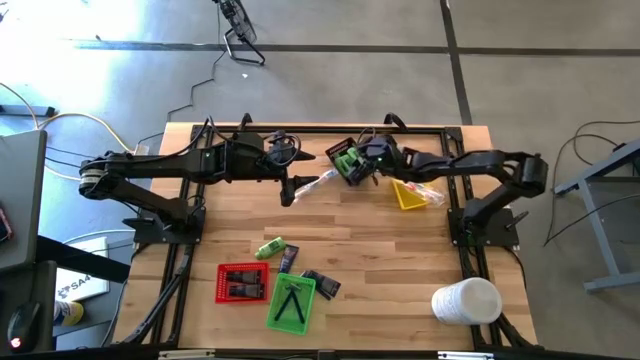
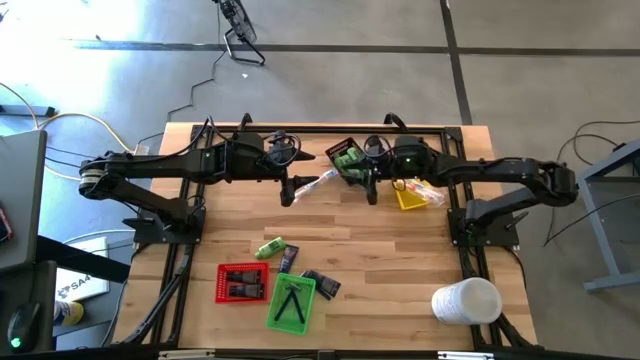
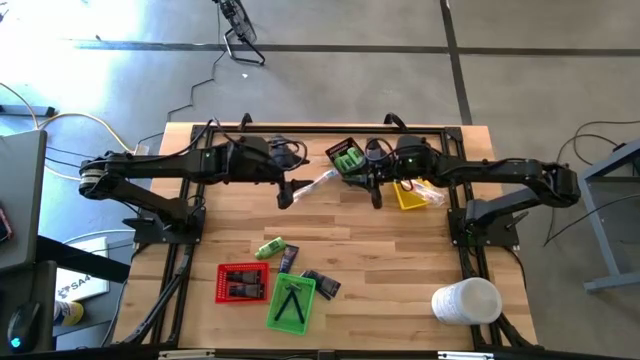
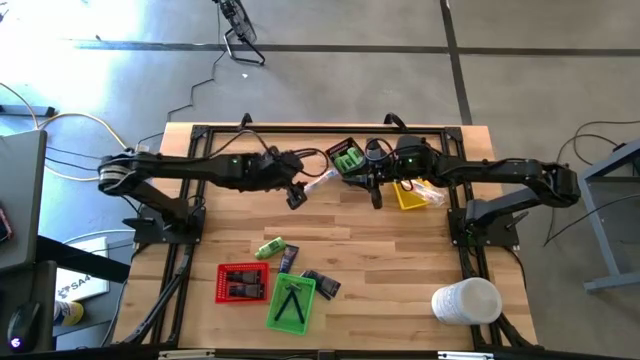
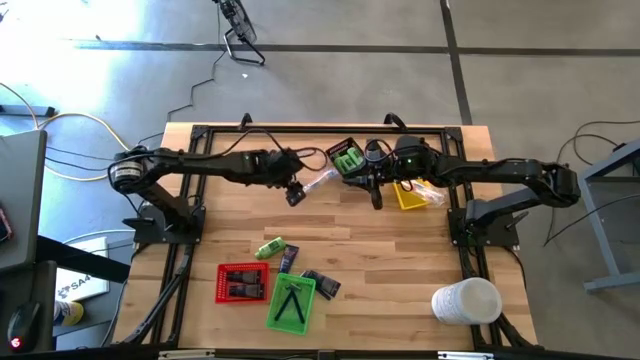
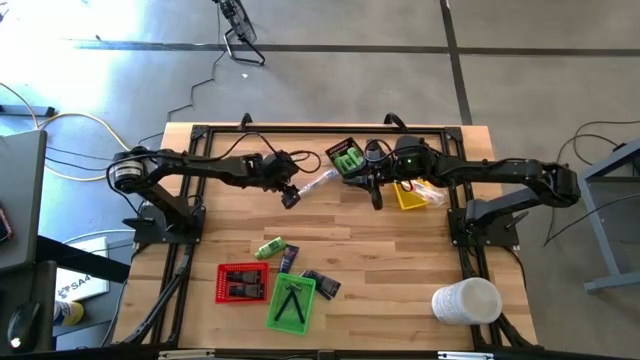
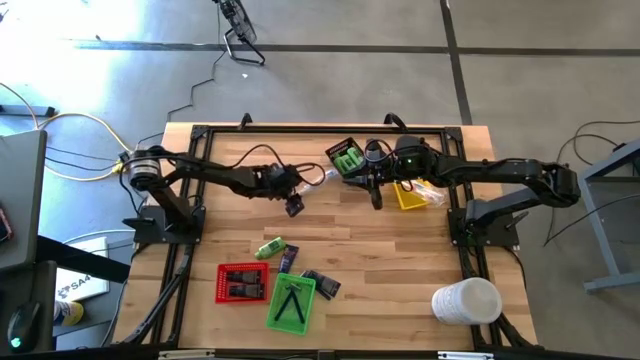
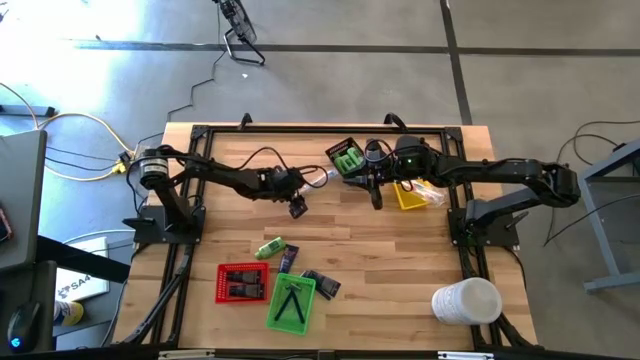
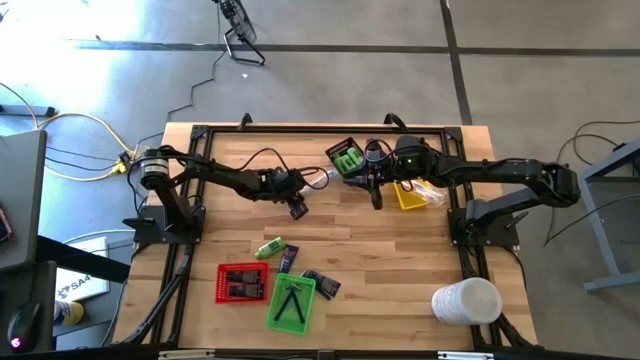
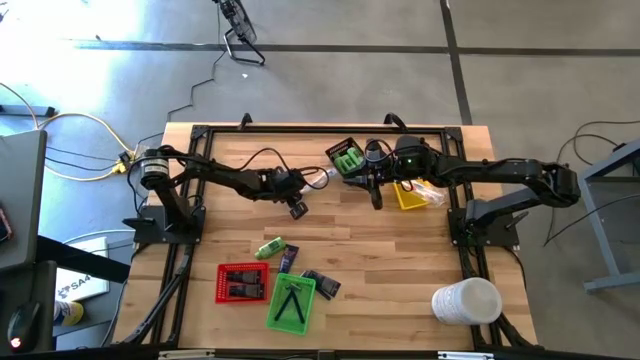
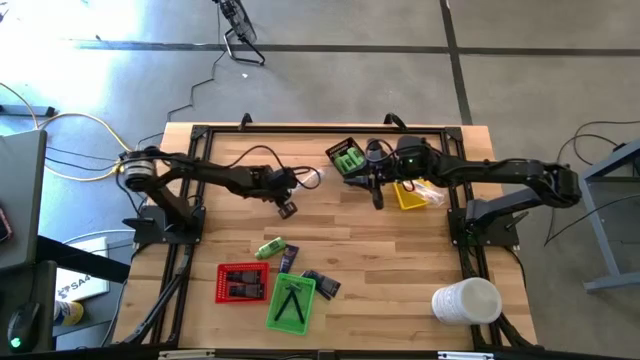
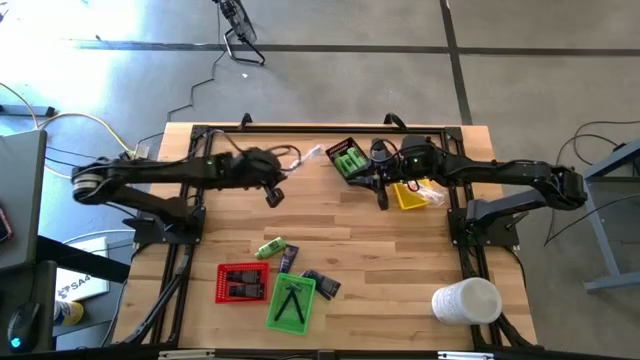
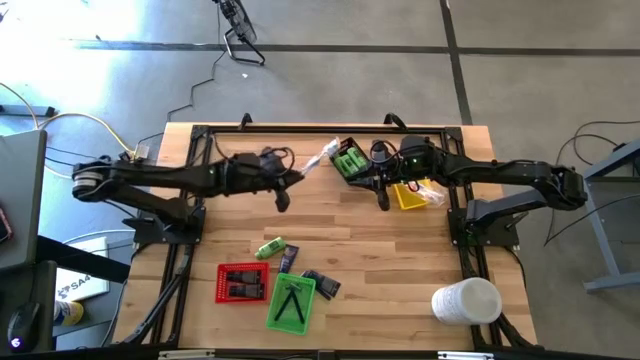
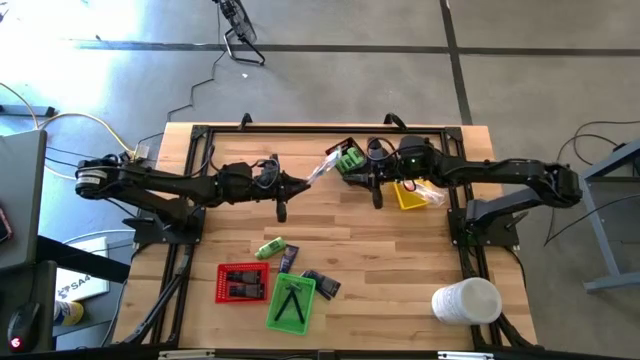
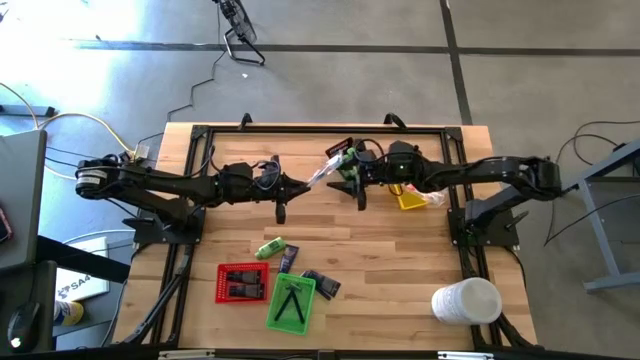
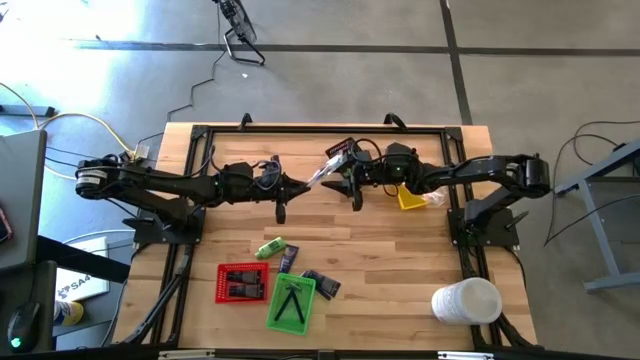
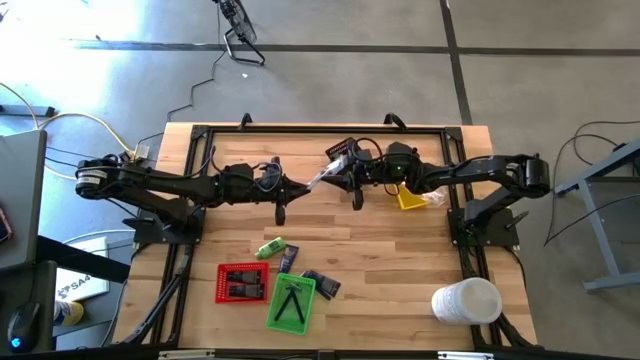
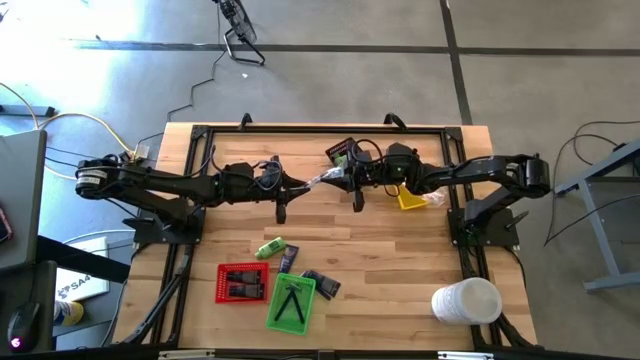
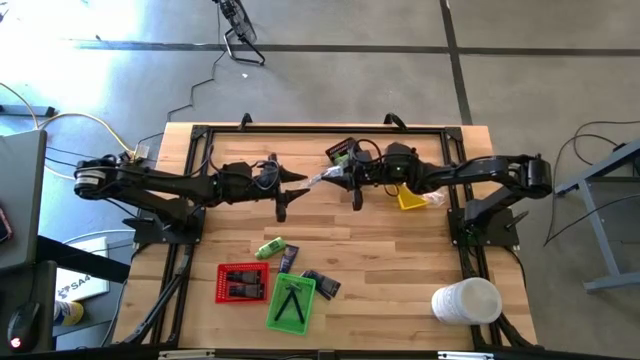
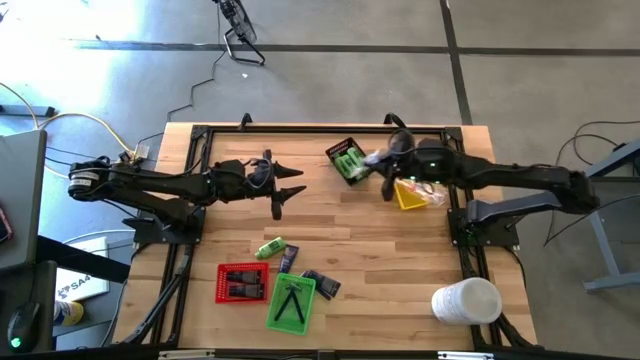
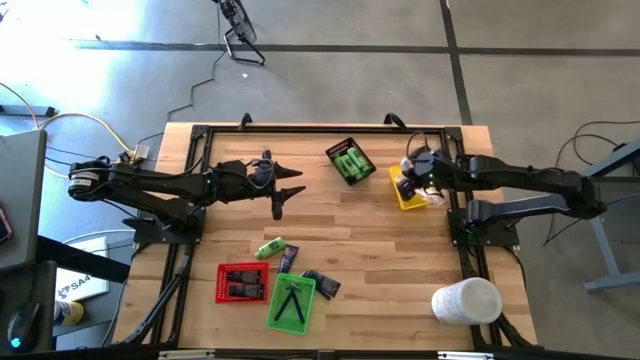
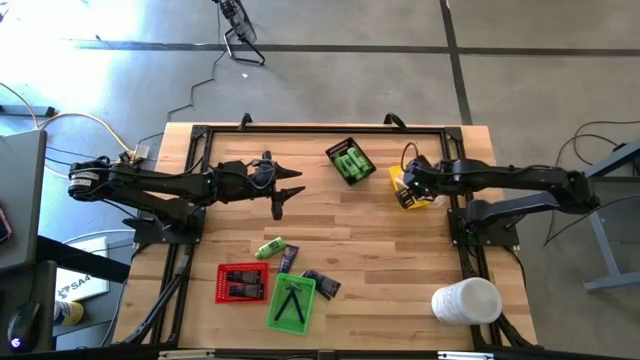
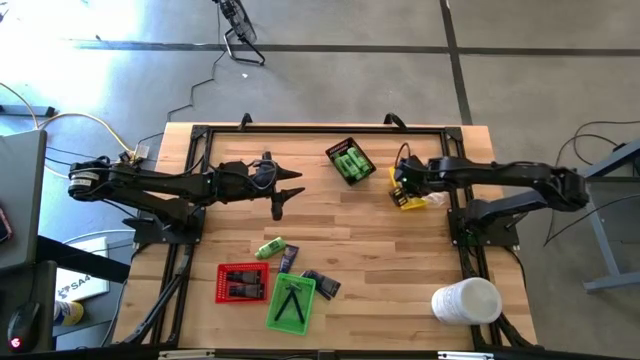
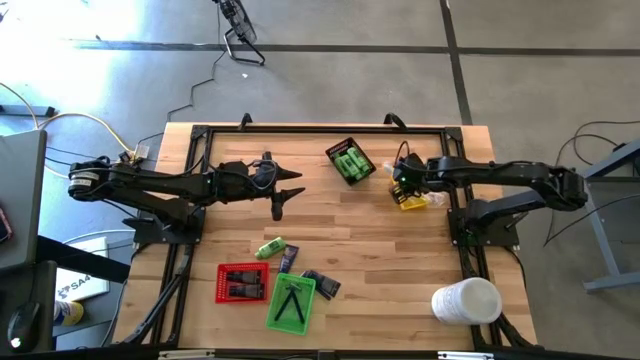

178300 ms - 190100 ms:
Task: Pick & Place Travel size toiletries
Put the blue toothbrush into the yellow bin

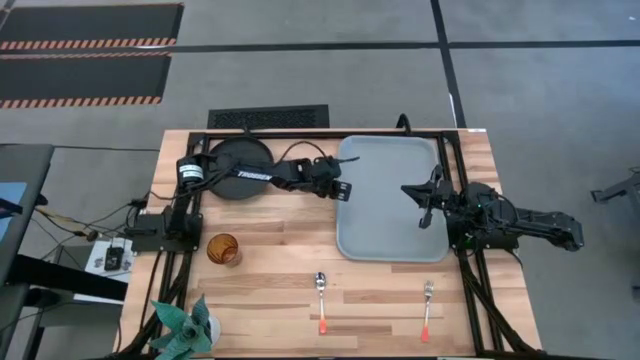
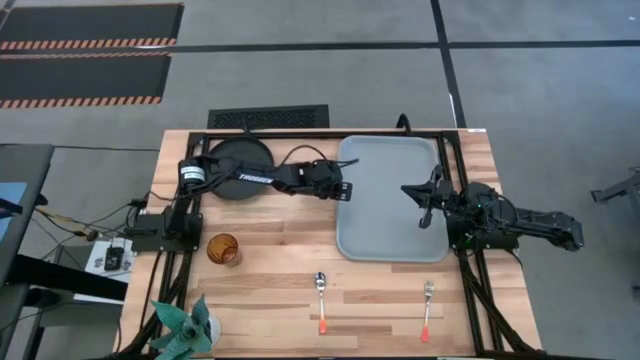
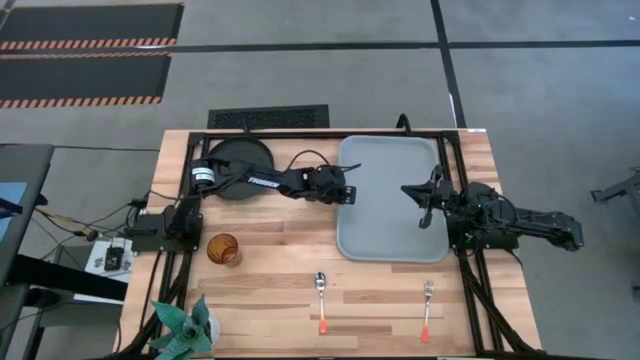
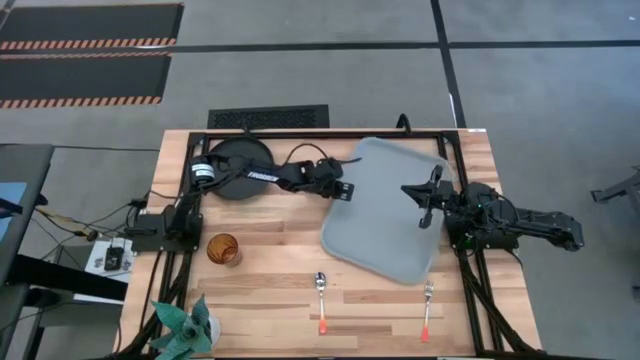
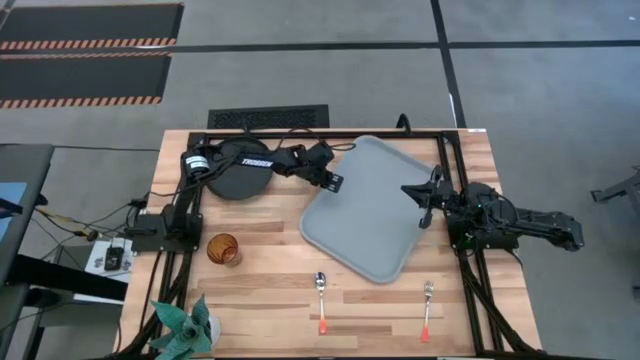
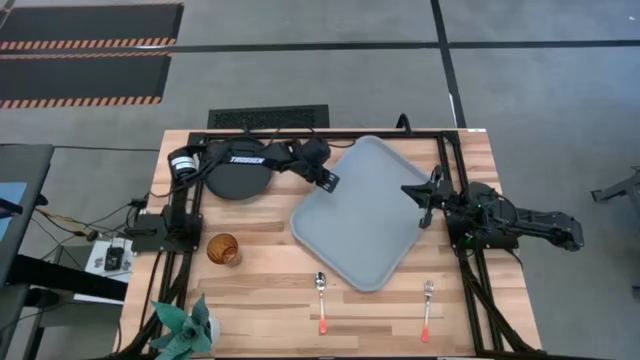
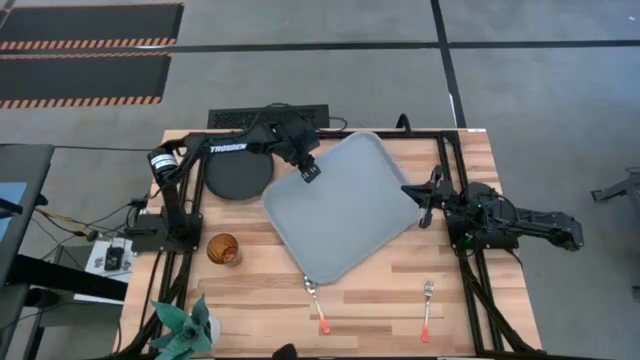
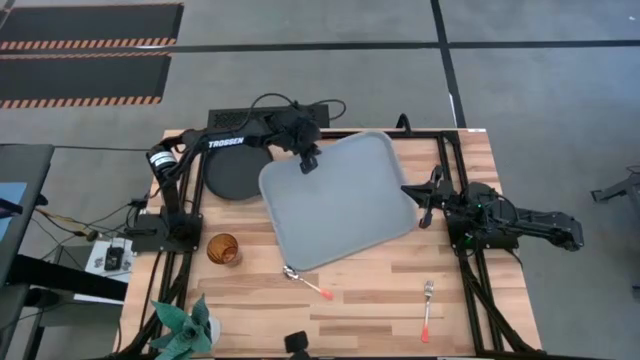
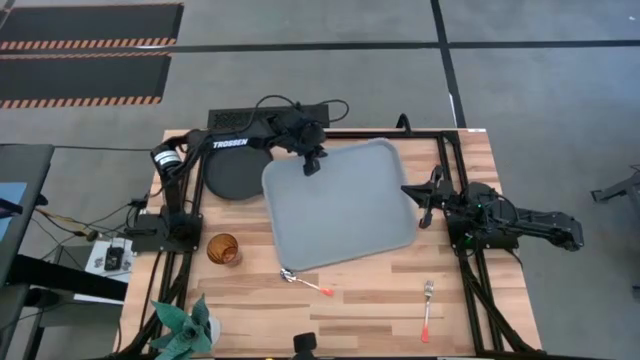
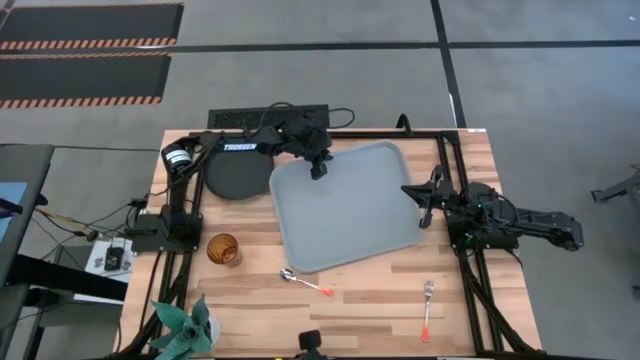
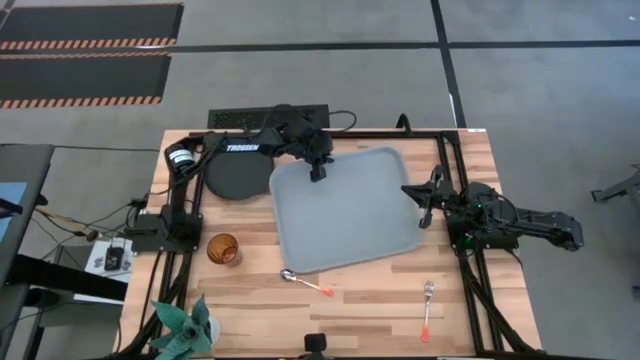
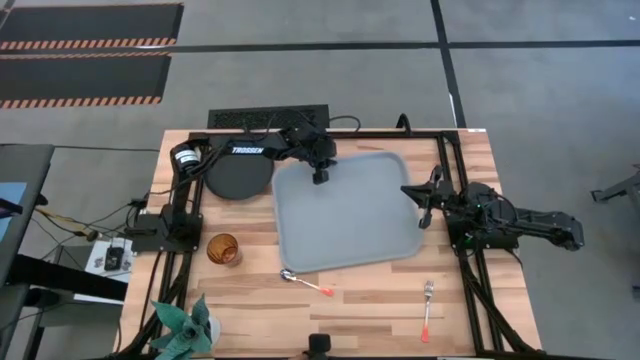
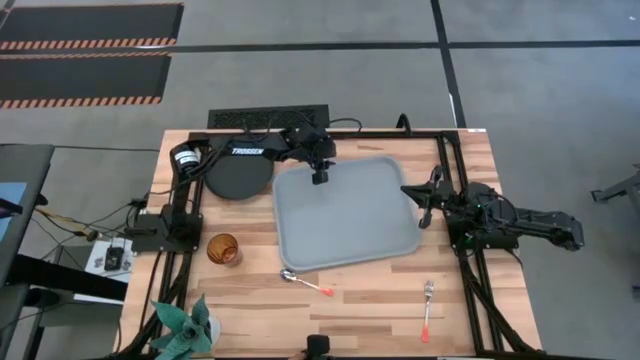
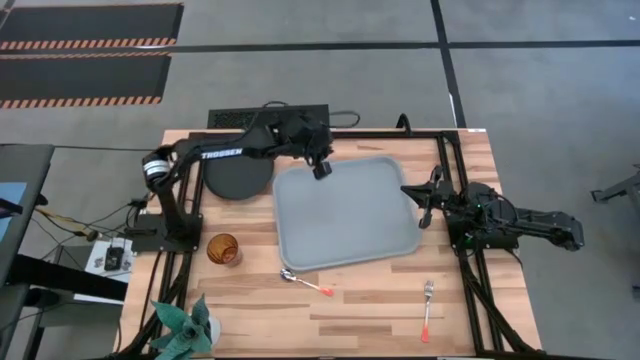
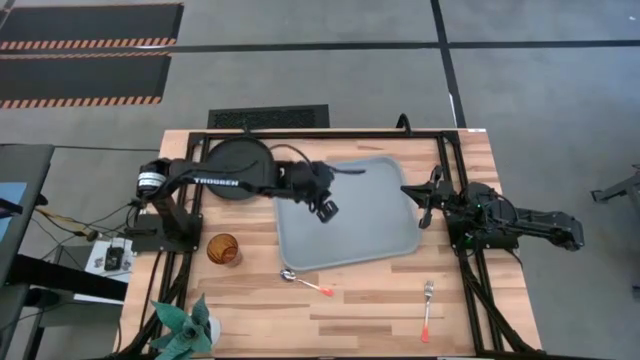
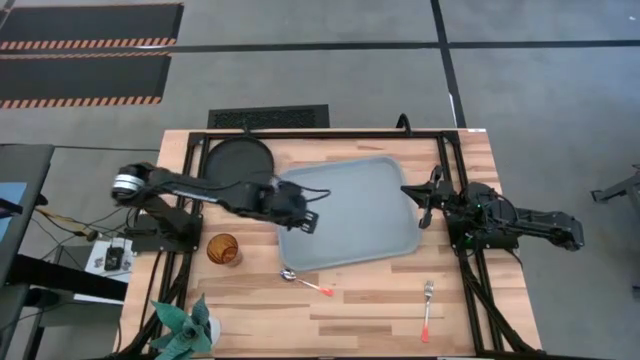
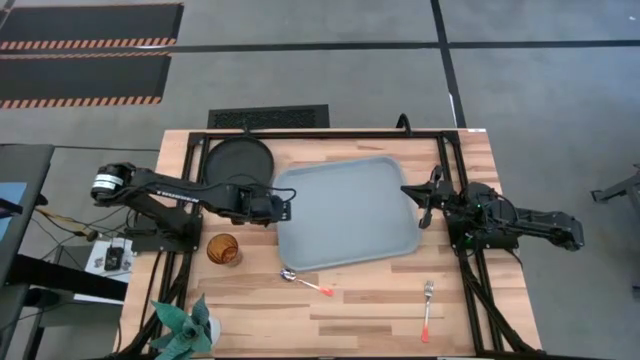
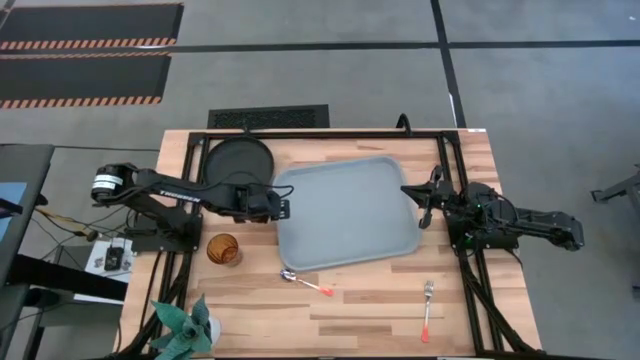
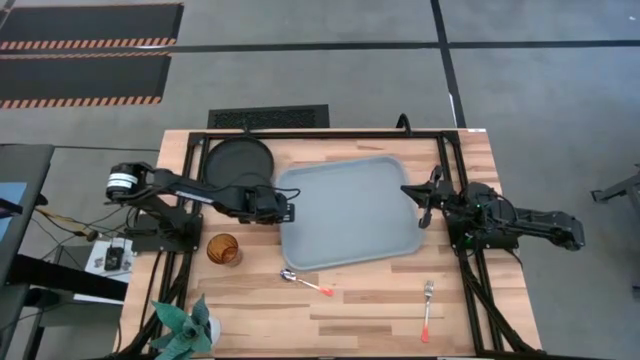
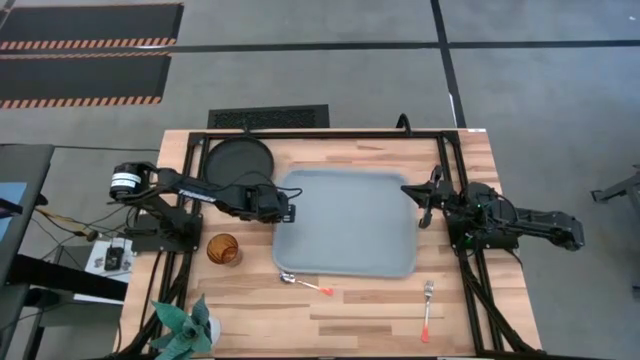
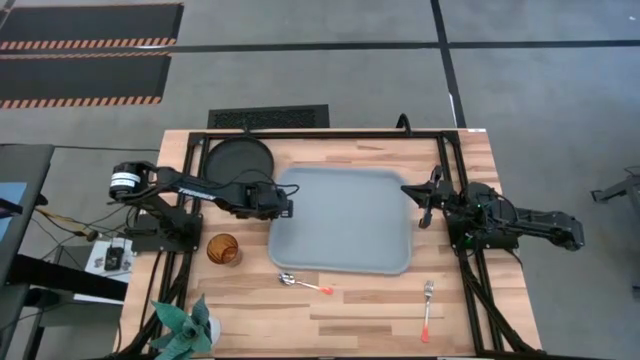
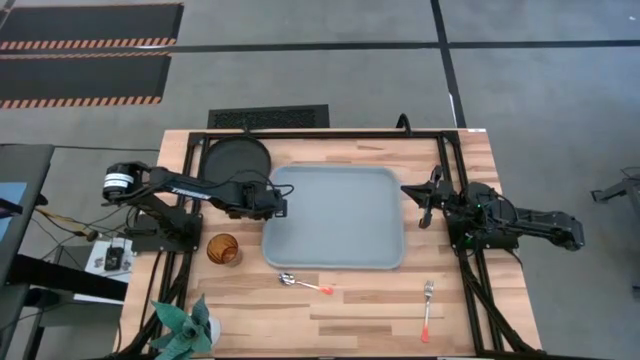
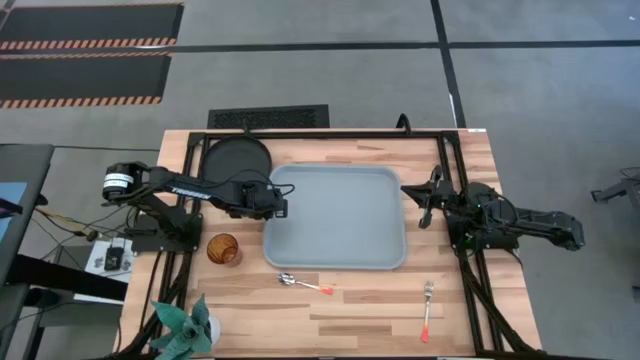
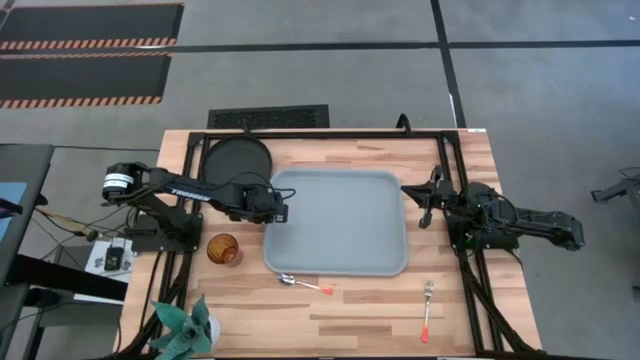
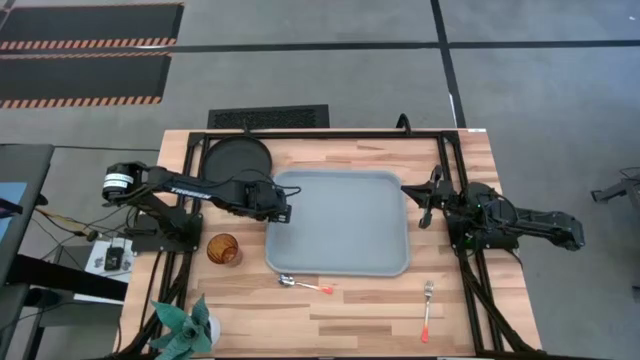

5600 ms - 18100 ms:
Task: Pick and place plate/cup/fork/spoon on tray
Prepare the gray tray in the center of the table
